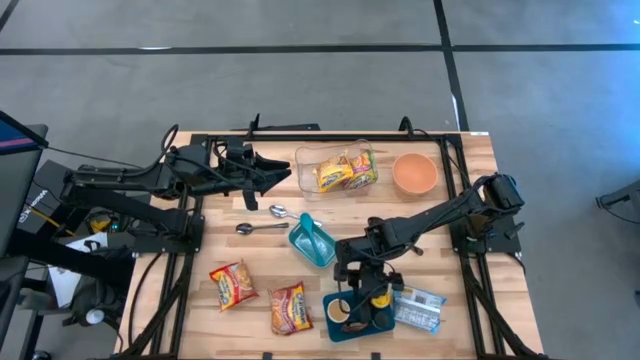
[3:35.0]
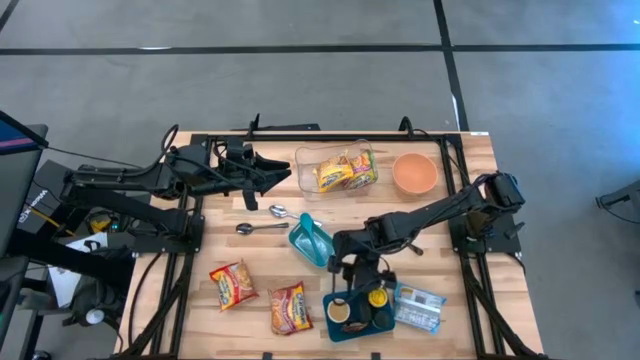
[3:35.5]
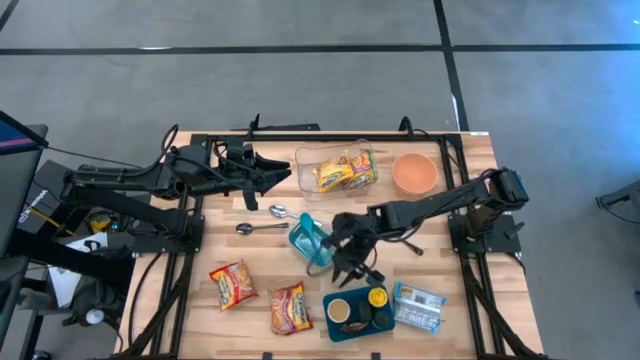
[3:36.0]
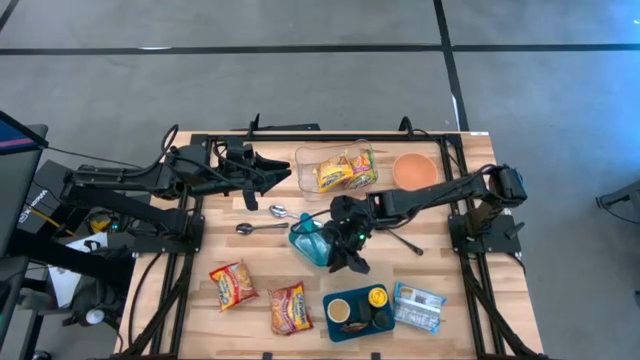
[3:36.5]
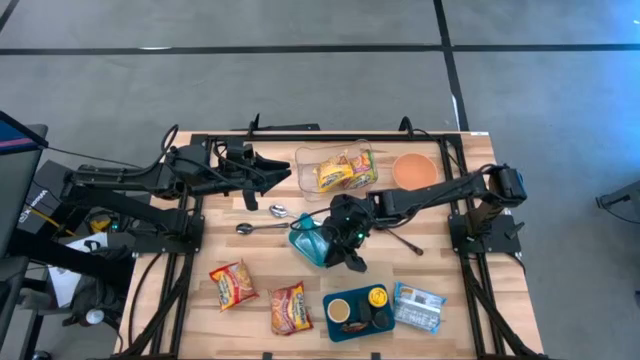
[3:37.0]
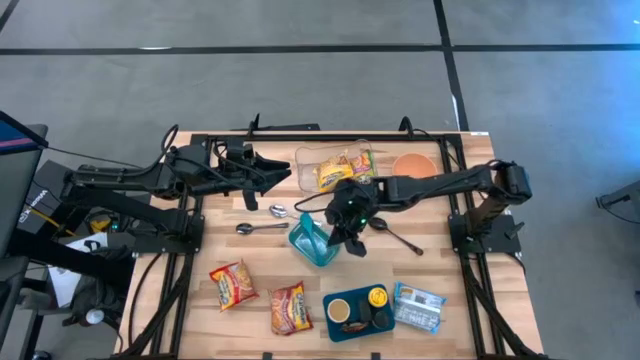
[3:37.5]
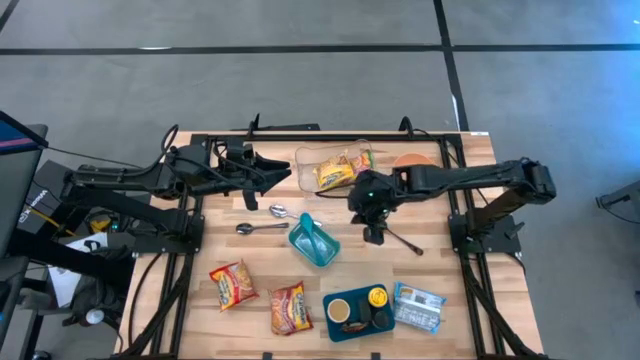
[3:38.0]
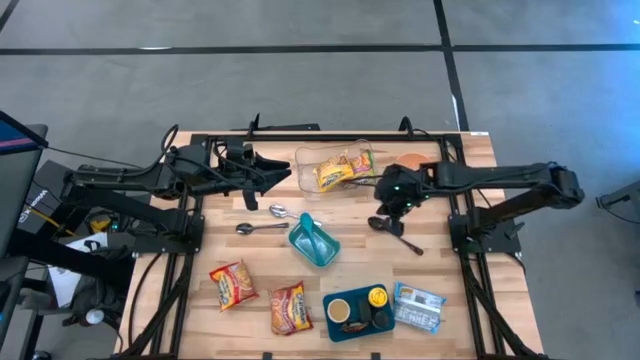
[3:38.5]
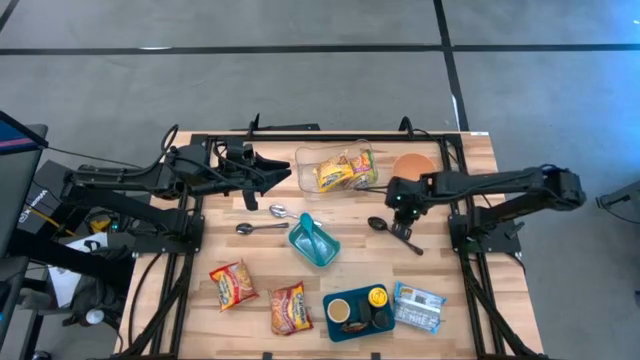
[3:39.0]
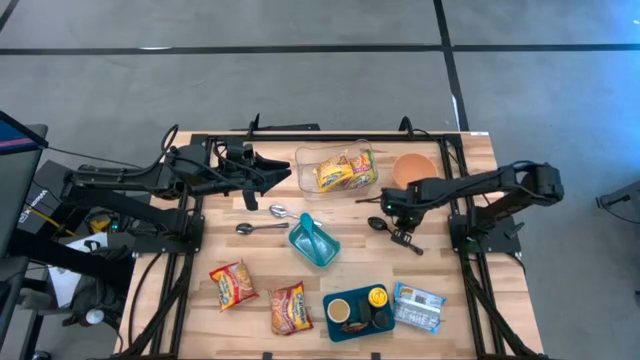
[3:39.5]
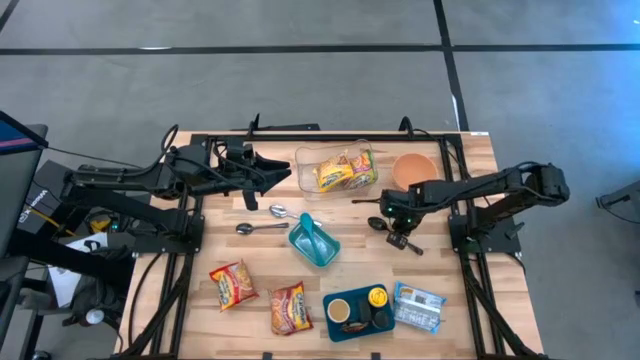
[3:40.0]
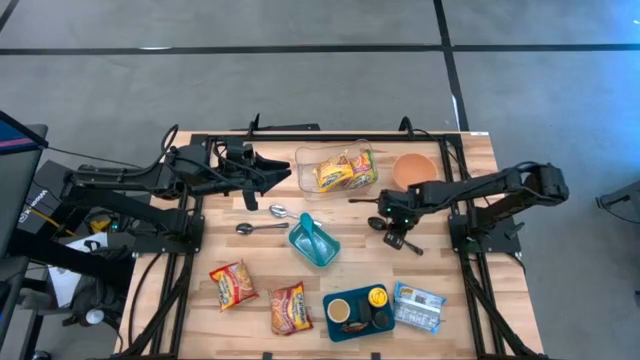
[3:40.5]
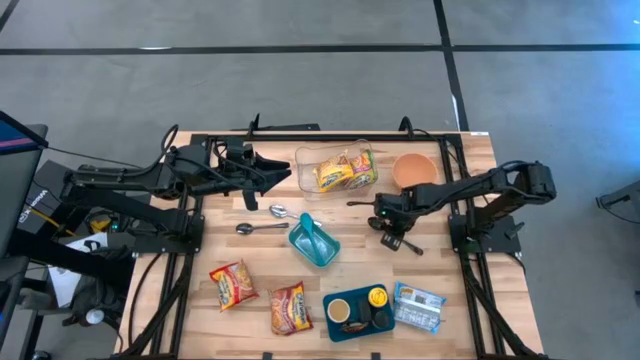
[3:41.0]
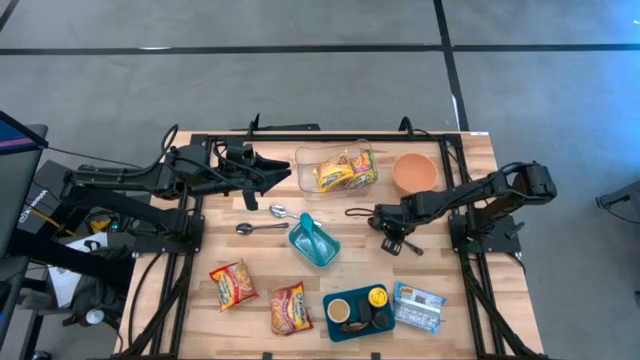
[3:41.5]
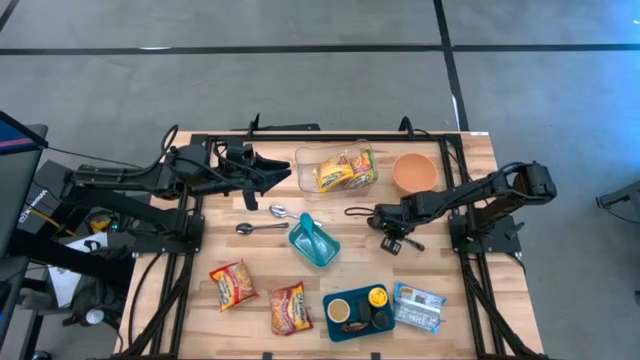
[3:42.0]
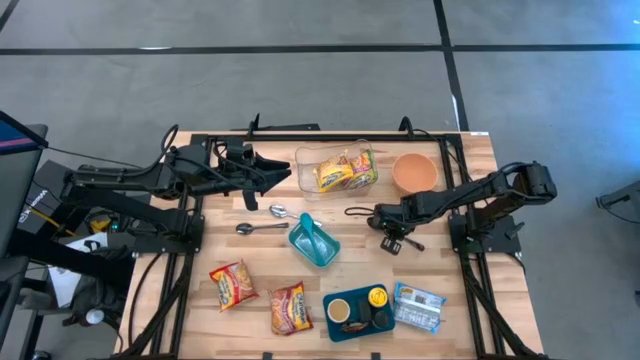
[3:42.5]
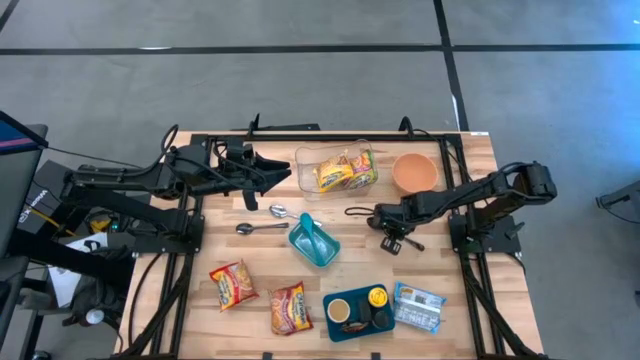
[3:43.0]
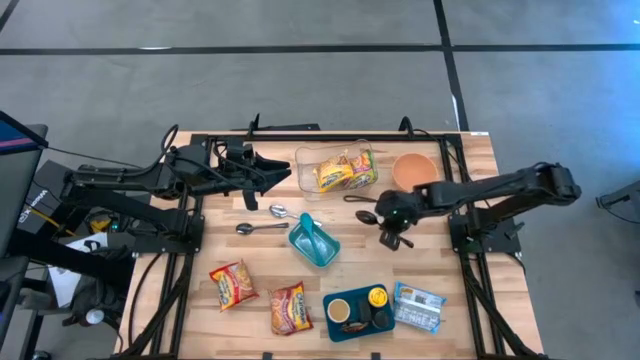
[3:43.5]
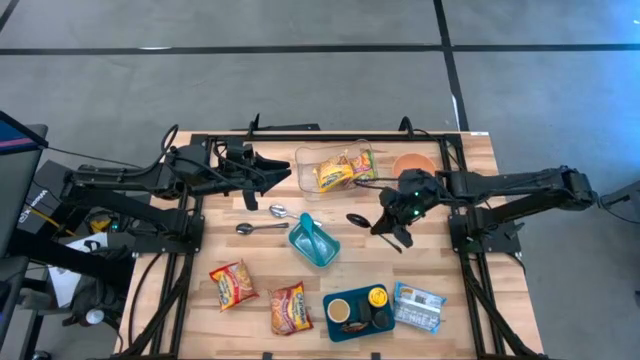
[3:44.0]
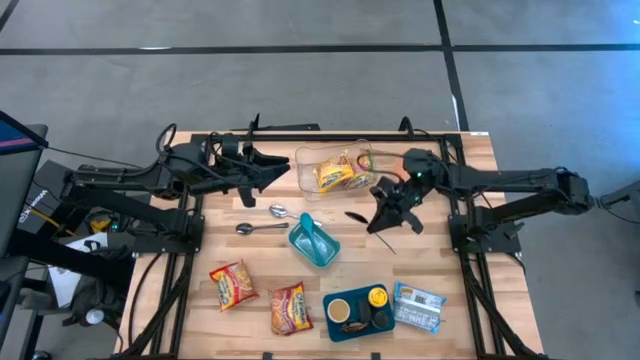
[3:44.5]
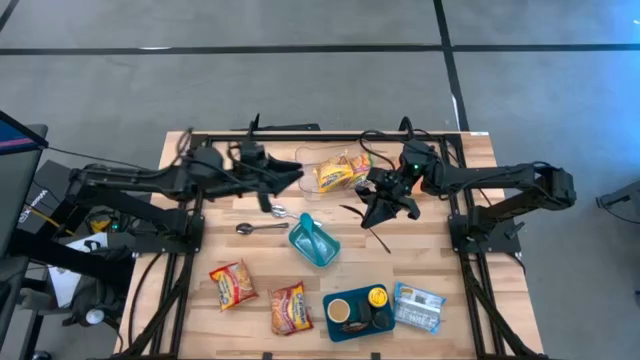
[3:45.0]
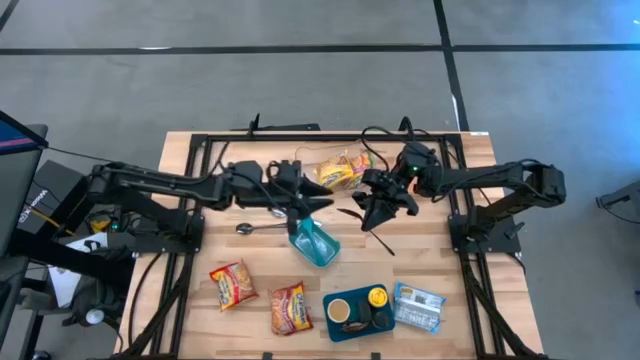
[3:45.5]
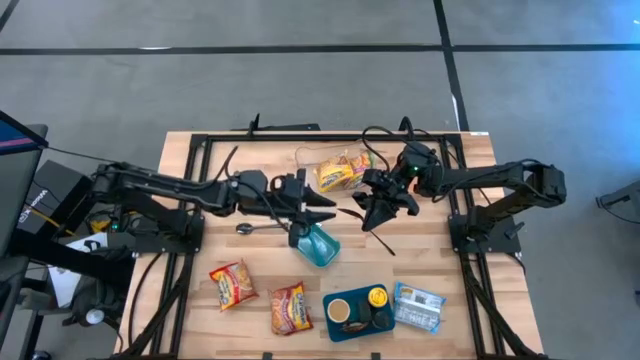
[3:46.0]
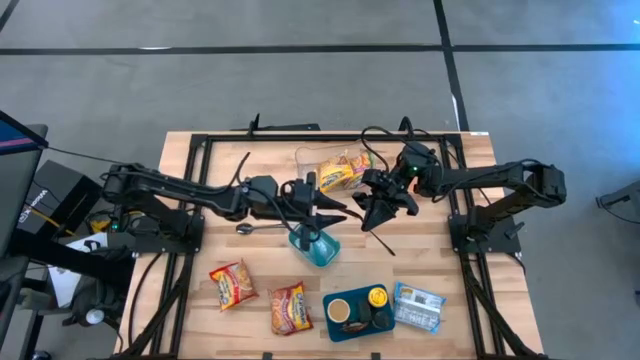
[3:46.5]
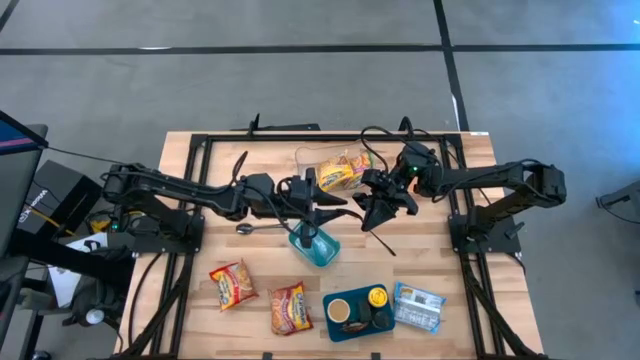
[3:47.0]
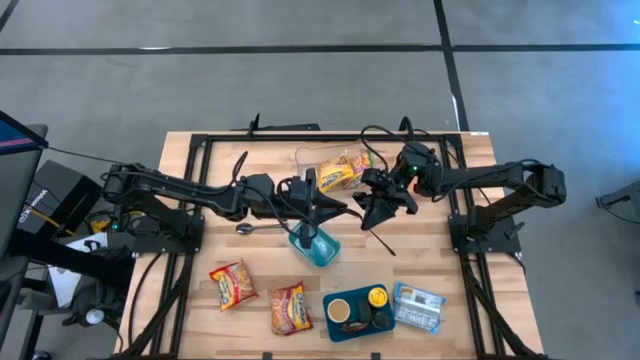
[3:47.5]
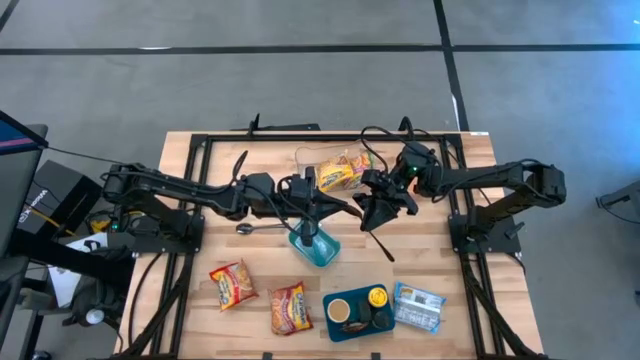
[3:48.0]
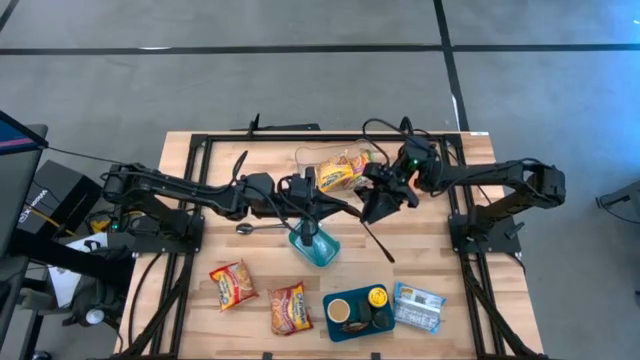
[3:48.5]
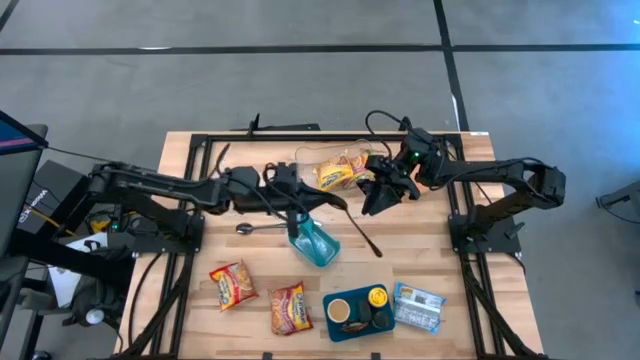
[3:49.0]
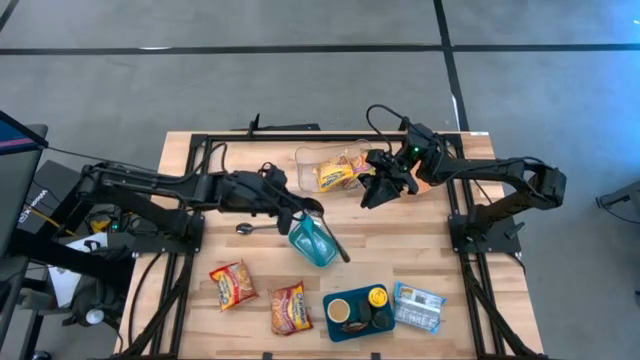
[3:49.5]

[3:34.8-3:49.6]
Task: Pick & Place Food Item
Put the right black spoon into the green bin

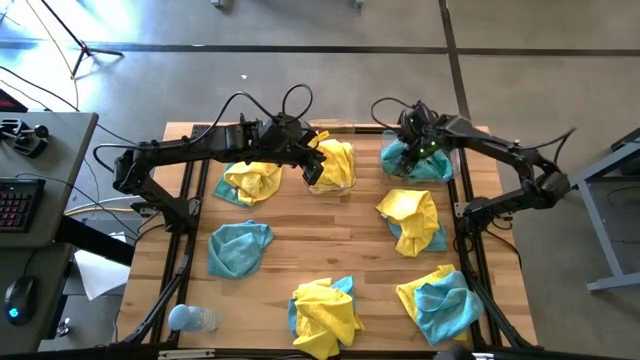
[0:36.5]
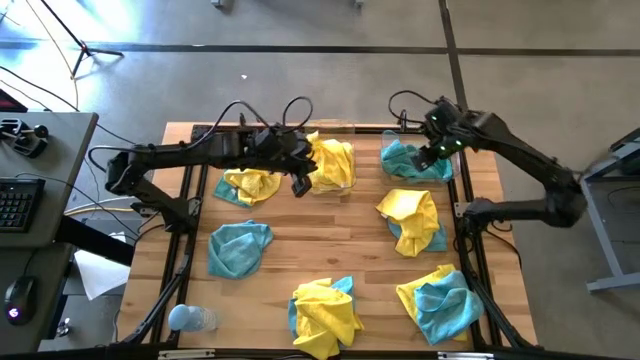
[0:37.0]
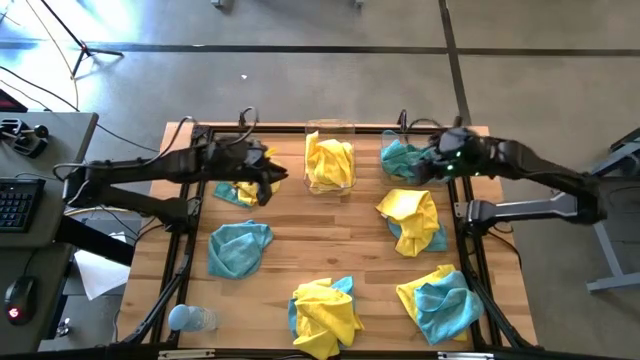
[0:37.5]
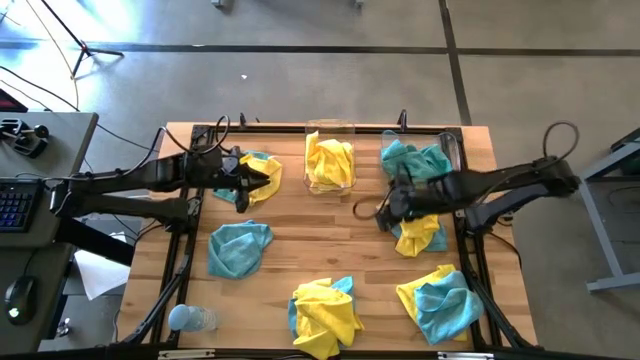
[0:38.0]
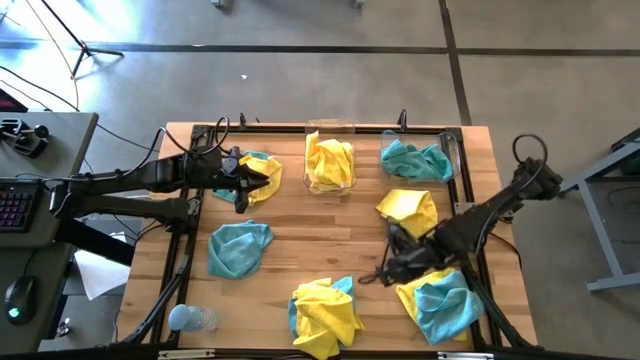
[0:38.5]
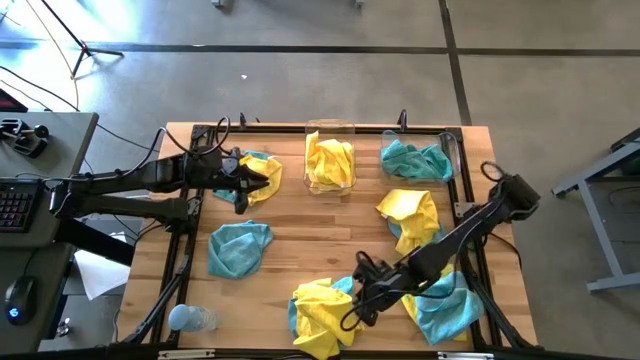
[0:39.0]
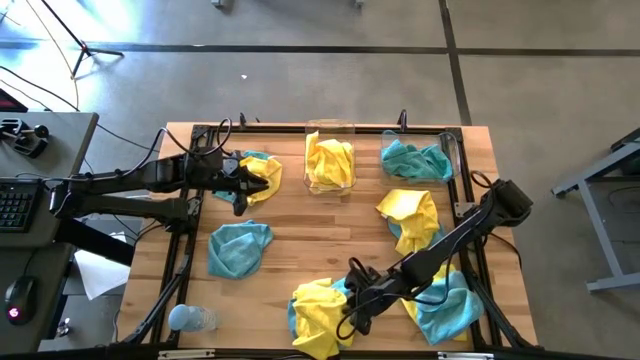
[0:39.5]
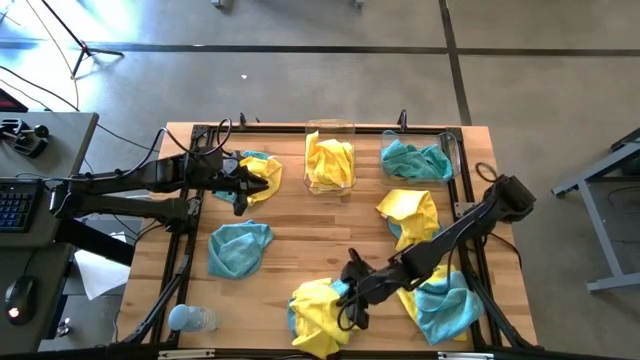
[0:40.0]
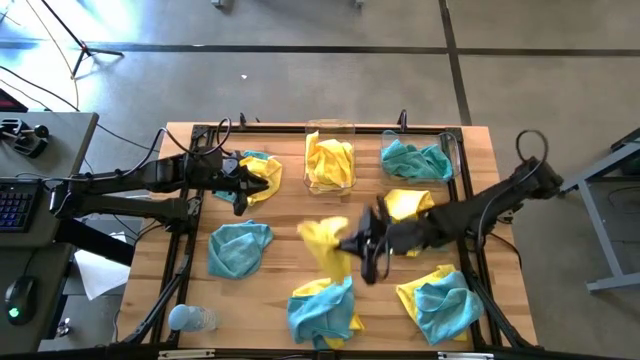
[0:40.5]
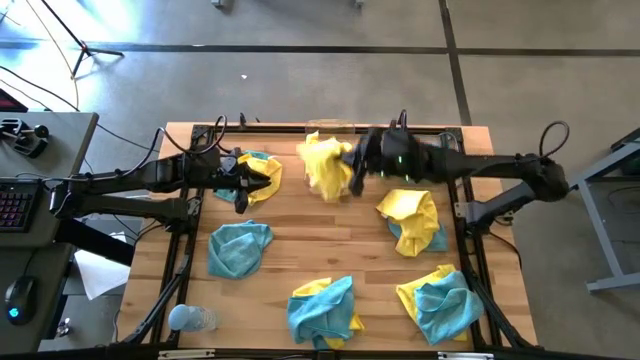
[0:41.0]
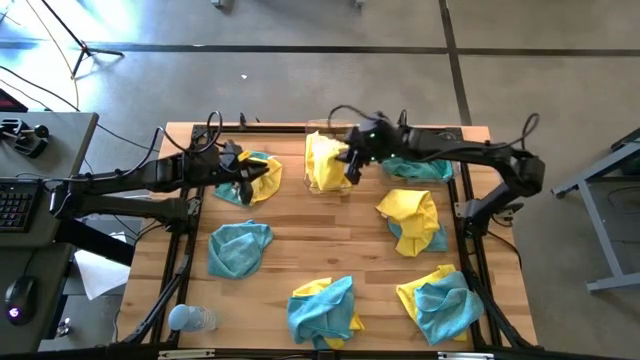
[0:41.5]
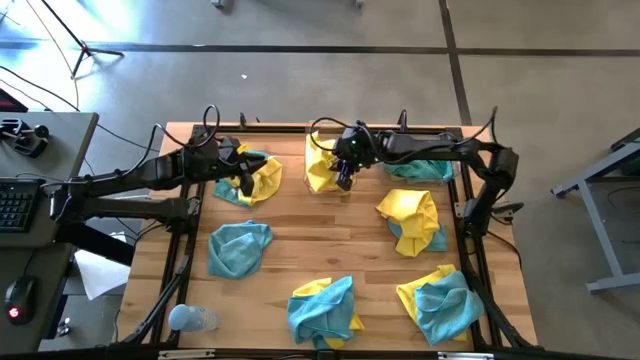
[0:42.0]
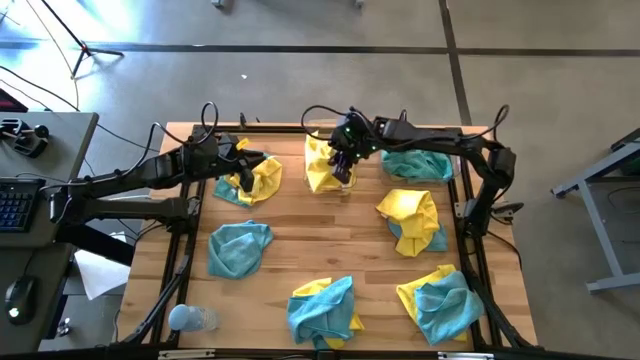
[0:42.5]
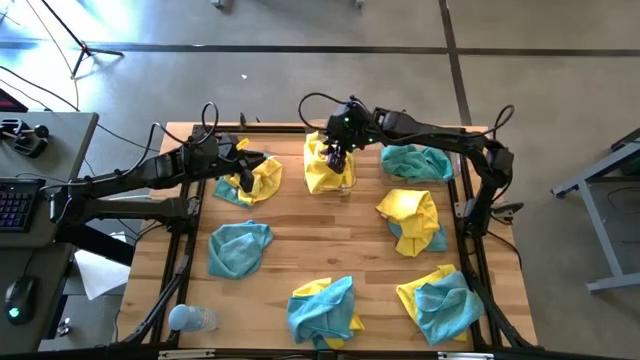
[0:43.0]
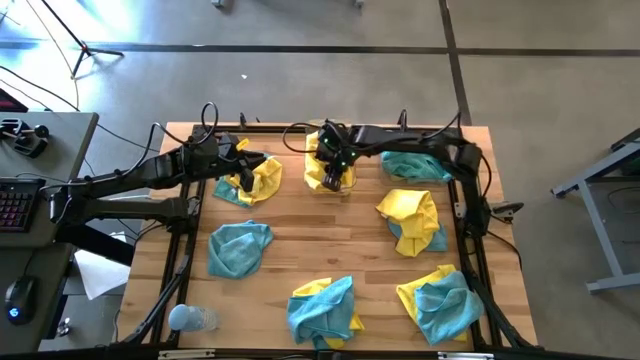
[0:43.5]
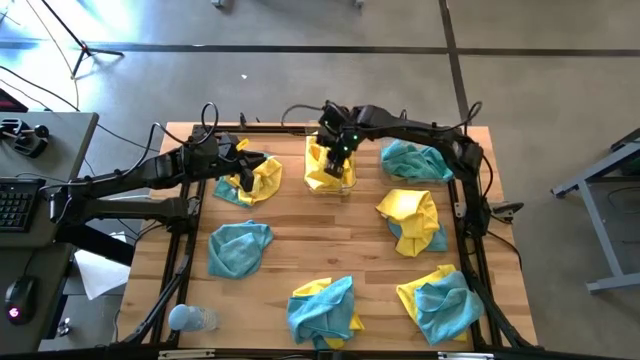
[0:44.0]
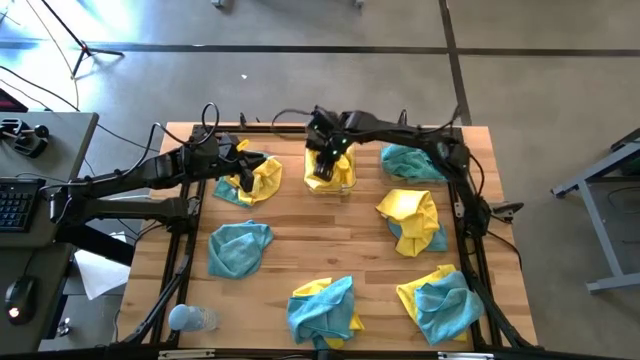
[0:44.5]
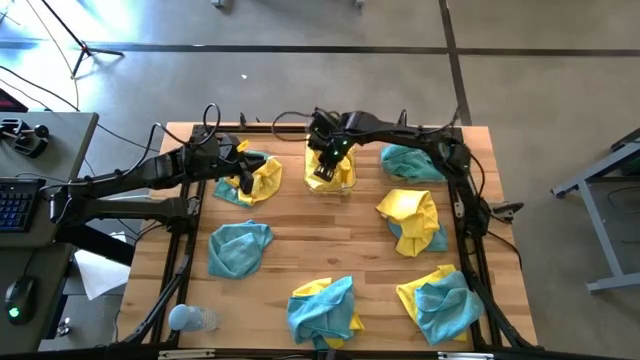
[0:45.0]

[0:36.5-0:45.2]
Task: Sort microfiber towel by color & place in baskets
Put the yellow towel into the left transparent bin
